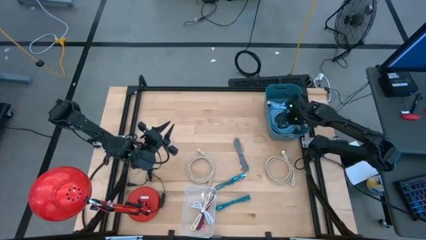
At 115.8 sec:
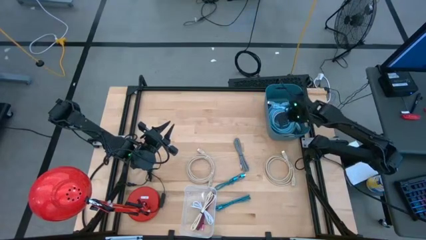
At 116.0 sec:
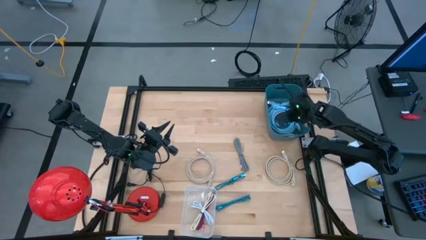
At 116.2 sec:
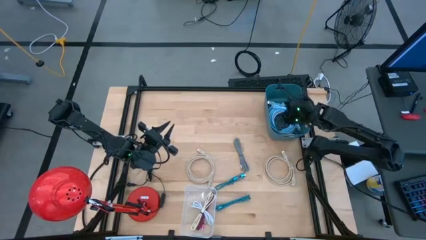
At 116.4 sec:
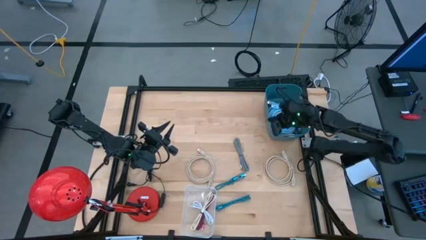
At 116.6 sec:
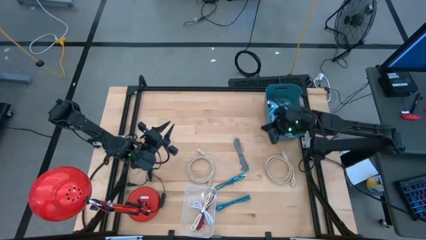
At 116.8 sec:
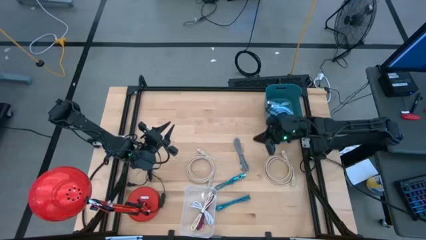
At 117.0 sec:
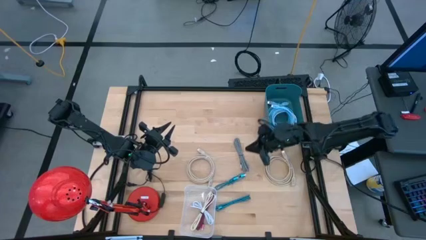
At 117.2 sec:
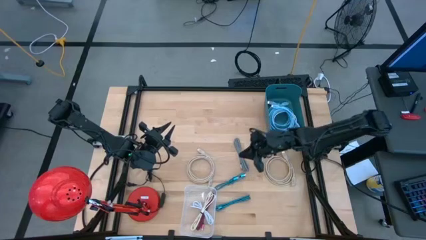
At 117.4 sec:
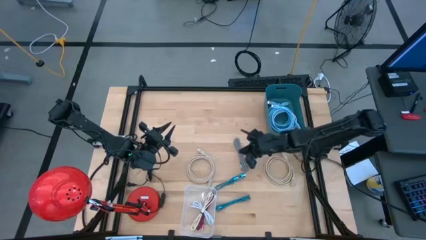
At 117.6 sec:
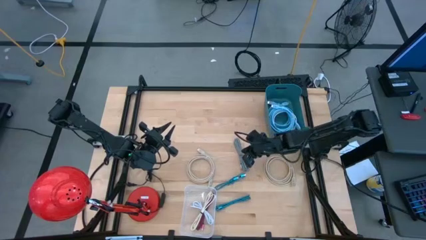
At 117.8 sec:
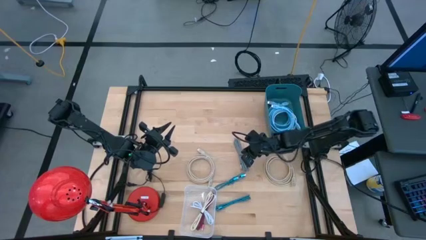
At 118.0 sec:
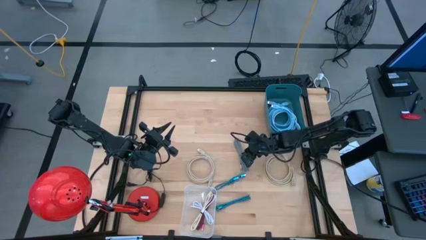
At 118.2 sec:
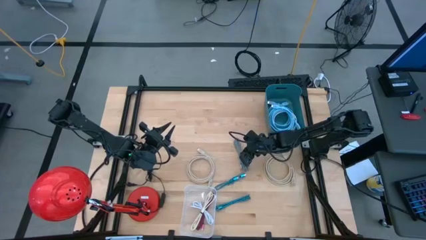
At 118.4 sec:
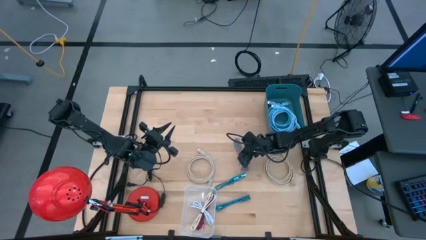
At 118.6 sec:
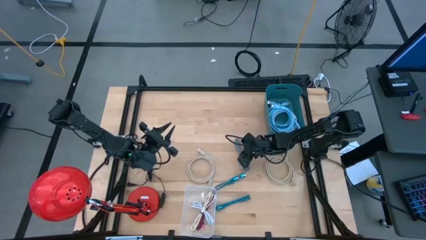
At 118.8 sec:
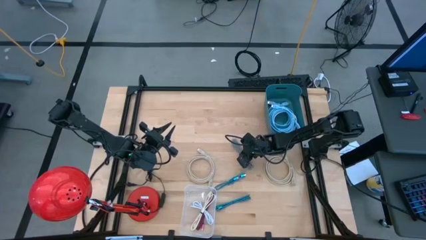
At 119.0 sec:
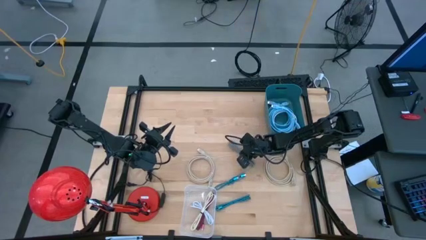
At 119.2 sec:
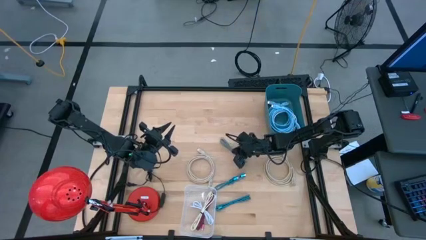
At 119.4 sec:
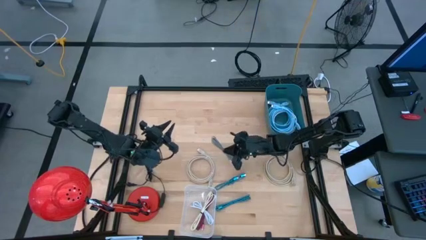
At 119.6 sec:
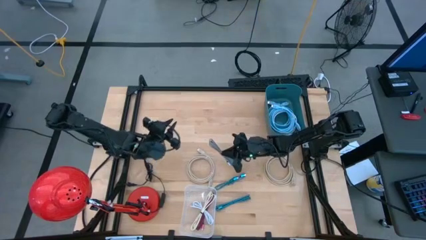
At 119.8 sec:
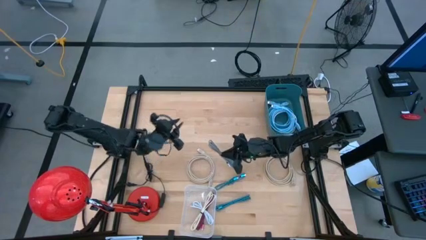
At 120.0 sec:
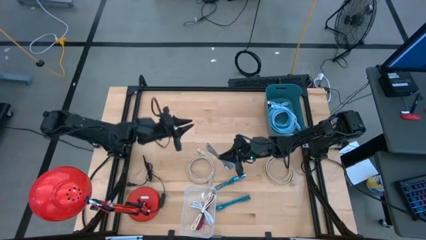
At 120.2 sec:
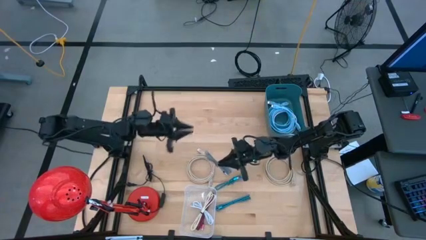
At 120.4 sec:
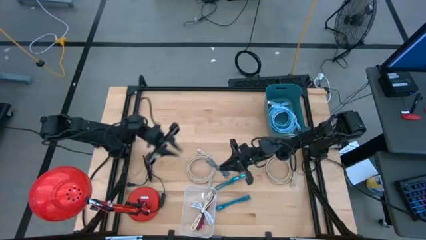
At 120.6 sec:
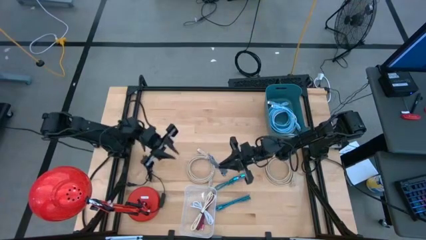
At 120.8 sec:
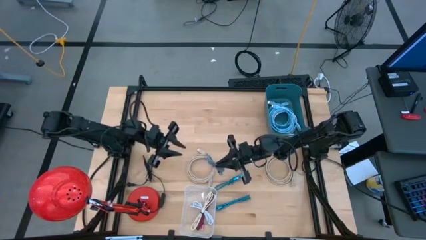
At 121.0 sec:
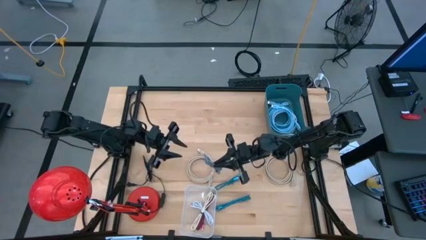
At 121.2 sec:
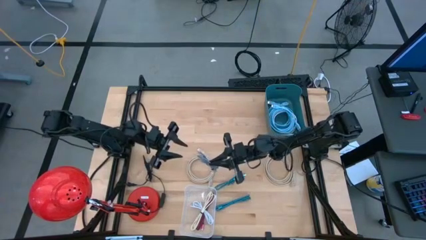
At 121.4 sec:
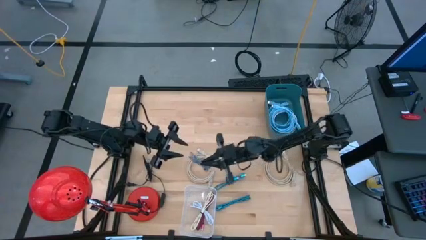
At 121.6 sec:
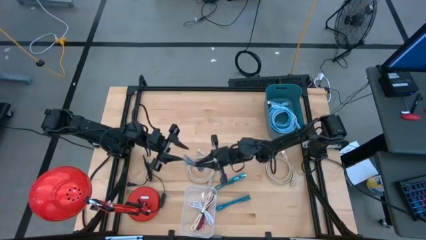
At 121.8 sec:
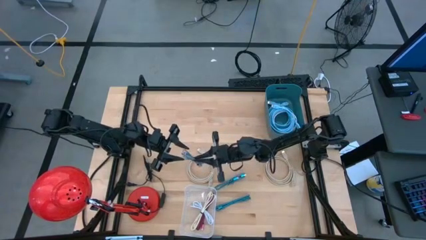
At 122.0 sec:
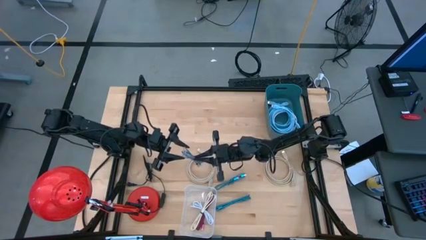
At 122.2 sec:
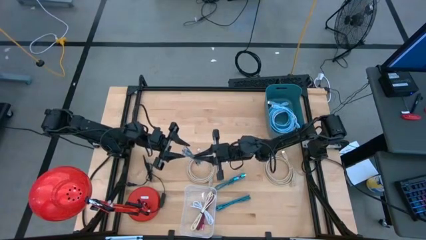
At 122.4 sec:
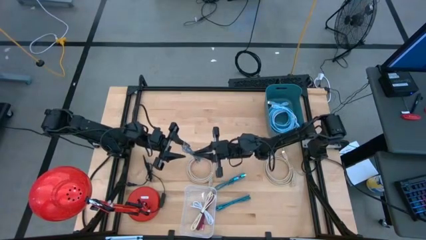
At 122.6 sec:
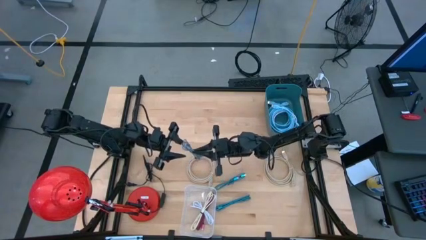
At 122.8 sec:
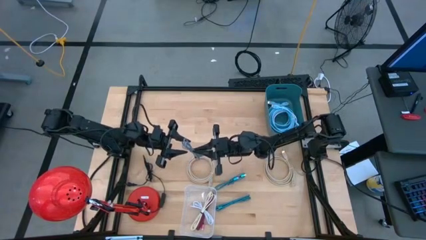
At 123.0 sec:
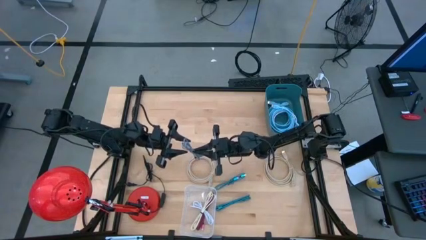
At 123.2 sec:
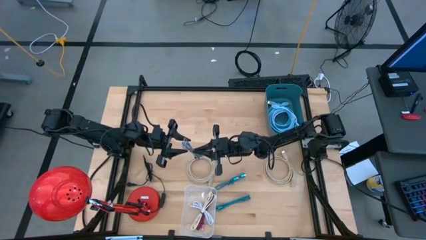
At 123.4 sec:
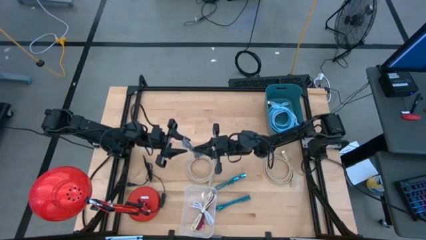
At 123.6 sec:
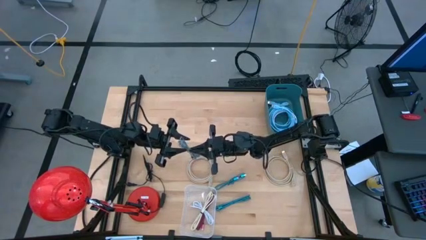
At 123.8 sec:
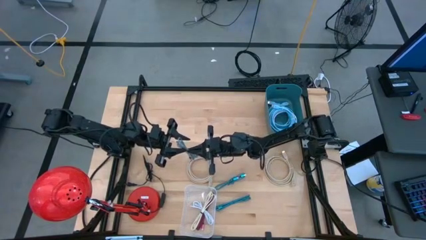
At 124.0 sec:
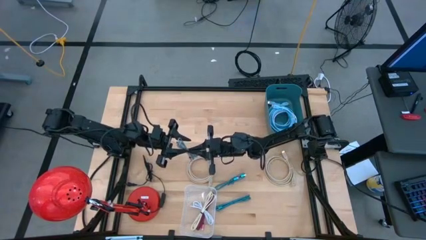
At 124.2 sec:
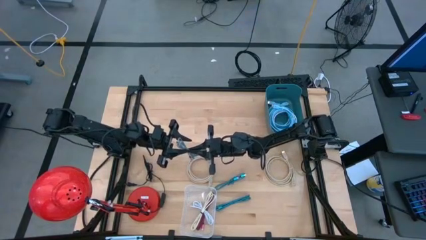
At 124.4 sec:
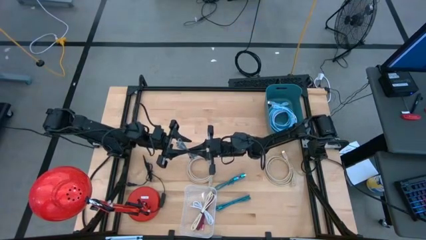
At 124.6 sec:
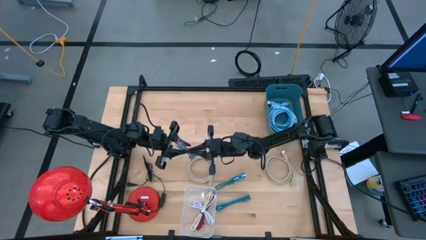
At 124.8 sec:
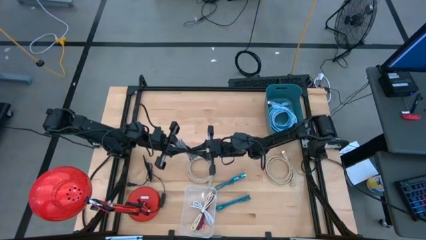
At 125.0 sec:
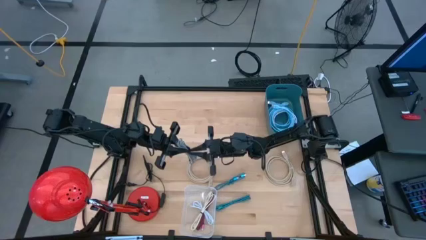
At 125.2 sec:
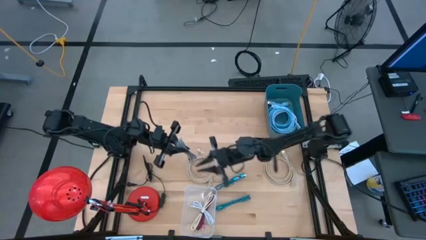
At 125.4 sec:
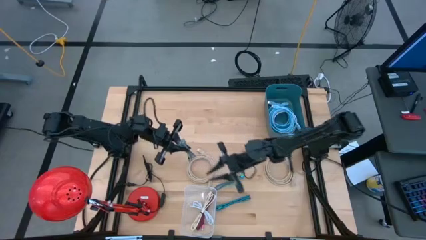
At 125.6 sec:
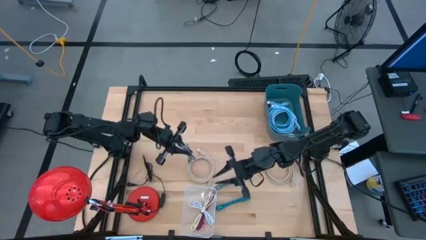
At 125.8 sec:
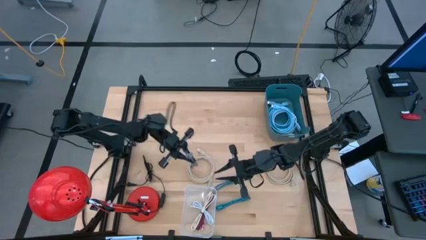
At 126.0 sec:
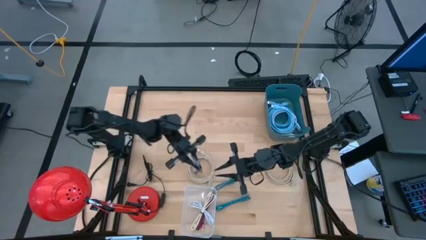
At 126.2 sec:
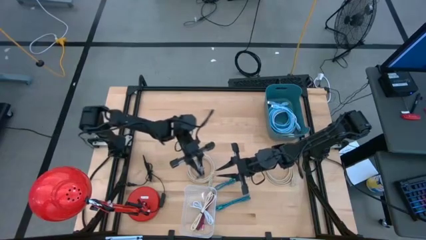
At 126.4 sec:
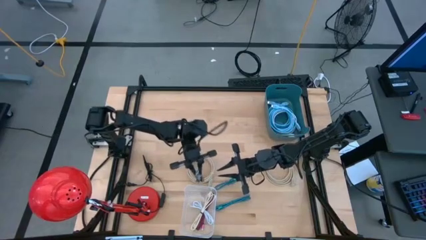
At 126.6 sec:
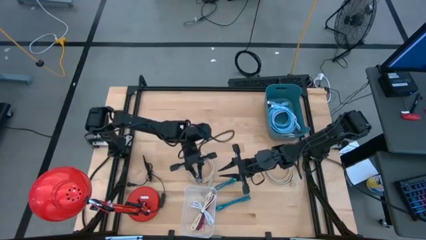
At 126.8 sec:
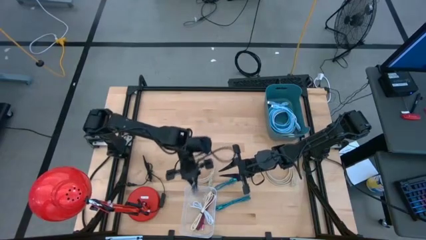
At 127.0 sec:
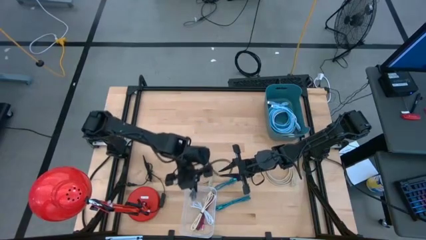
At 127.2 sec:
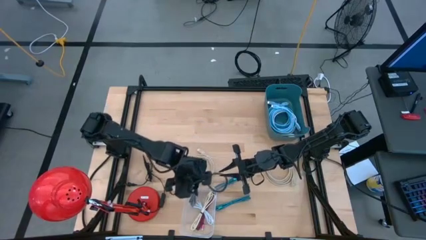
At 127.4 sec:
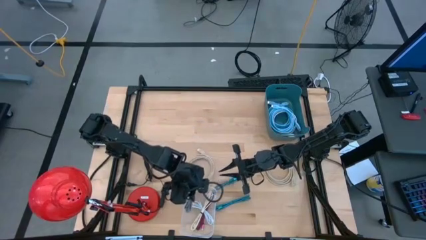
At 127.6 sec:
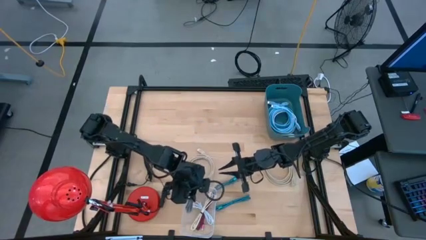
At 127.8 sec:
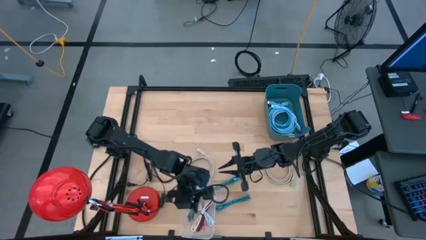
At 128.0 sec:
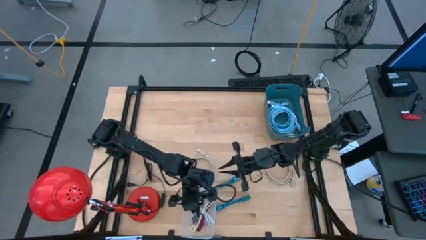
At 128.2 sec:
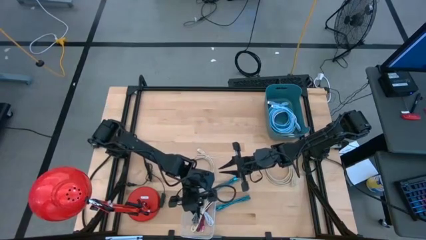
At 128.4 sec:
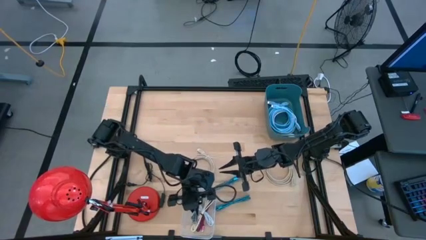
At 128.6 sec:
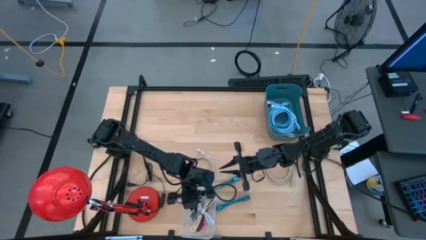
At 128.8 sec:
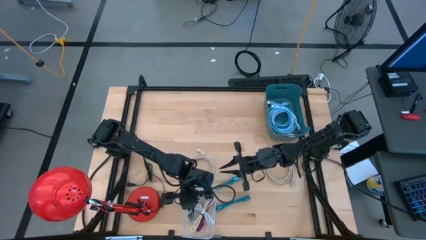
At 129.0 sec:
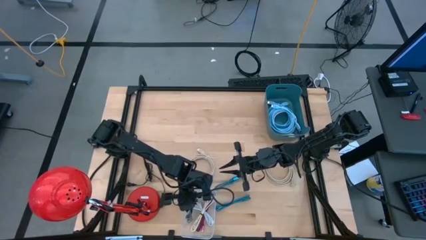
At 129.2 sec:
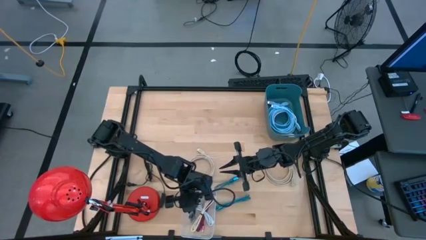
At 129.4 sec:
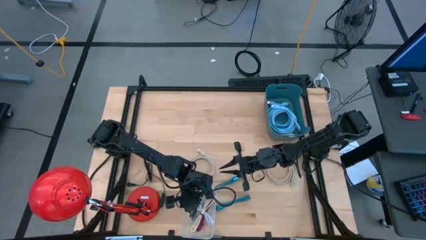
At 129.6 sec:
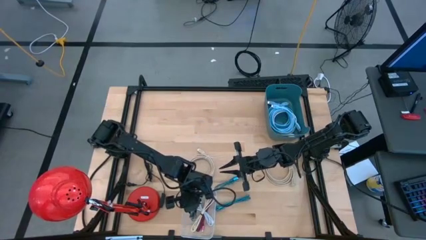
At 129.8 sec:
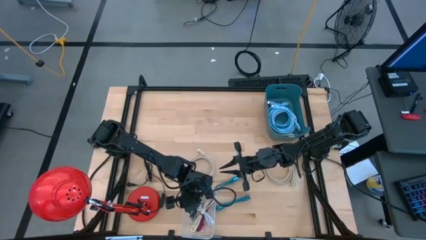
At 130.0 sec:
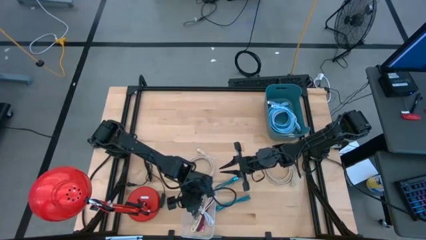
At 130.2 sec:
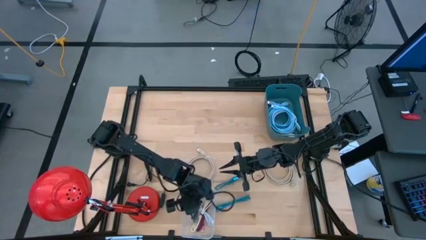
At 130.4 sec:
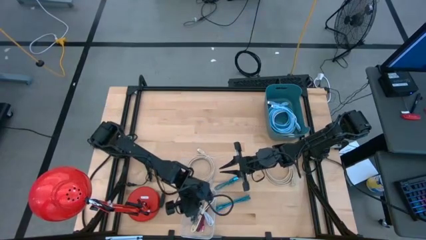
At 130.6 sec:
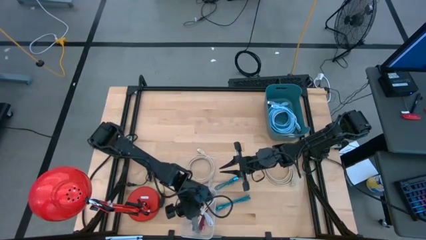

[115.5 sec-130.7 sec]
Task: Pick & Place USB Port
Put the black charger cable into the transparent bin

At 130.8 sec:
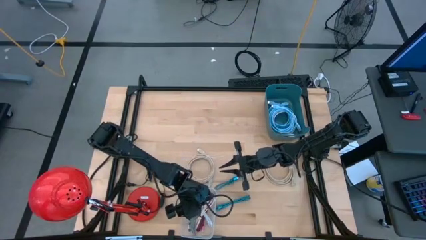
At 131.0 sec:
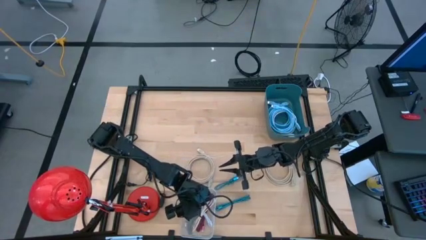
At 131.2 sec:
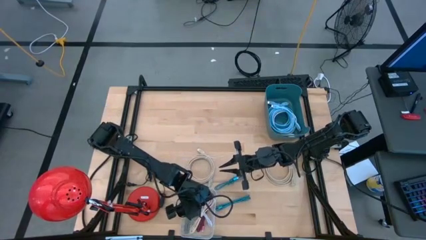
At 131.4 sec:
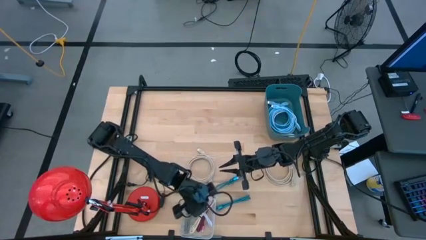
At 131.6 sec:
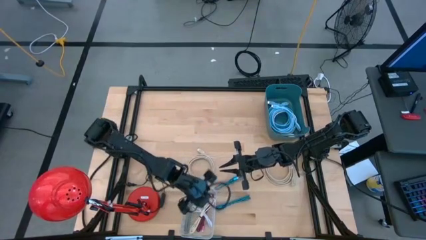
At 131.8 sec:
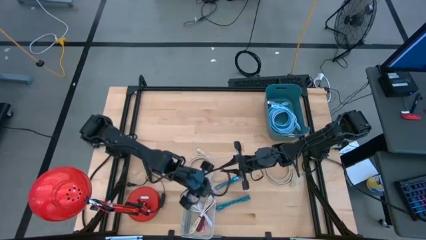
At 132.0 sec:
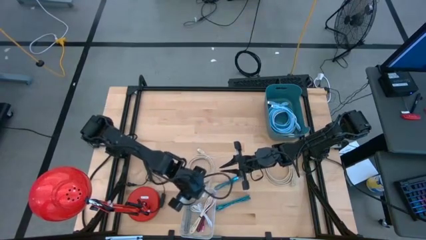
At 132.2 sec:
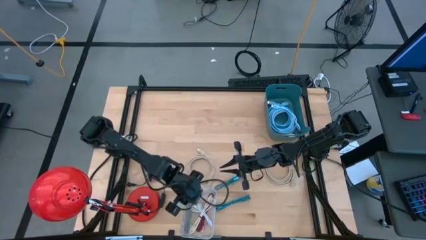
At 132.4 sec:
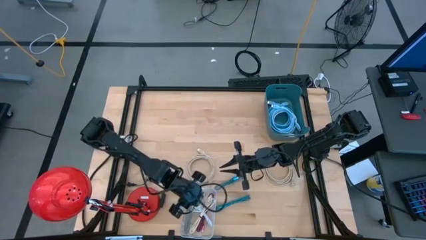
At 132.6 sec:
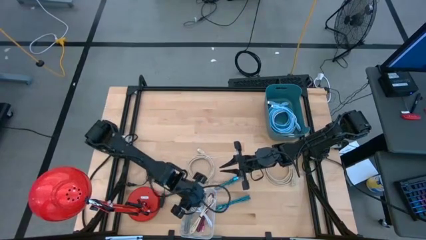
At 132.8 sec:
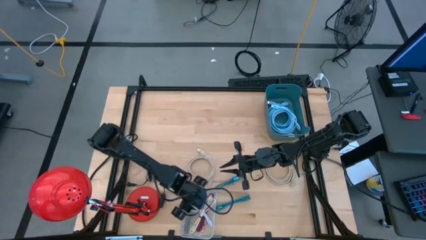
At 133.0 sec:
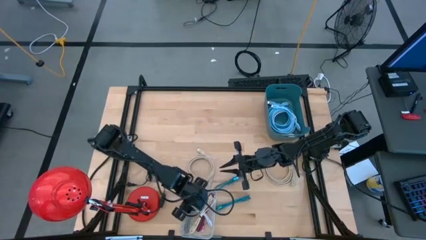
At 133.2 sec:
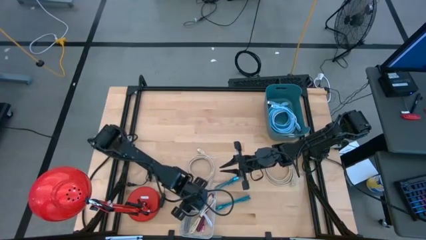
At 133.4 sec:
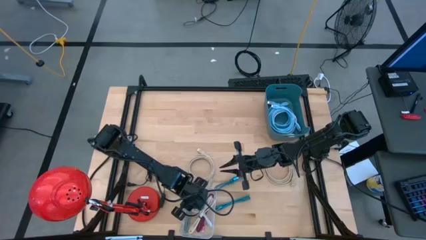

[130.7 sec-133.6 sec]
Adjust the white charger cable in the transparent bin
